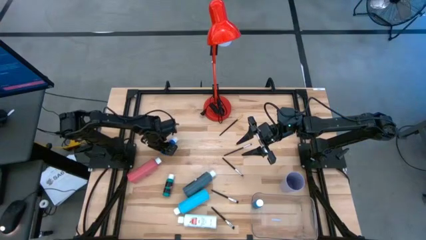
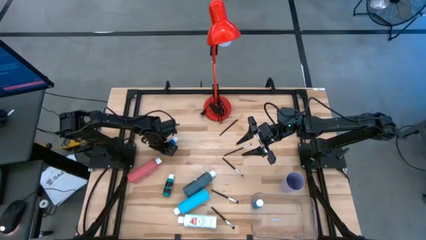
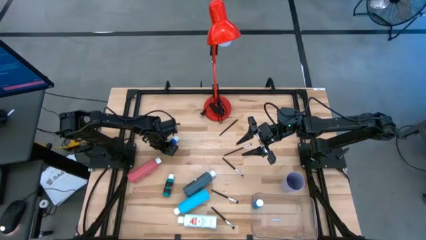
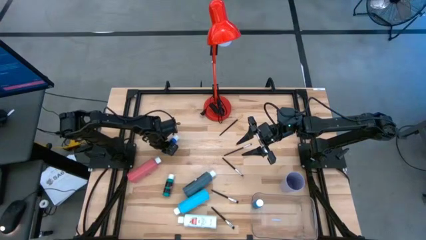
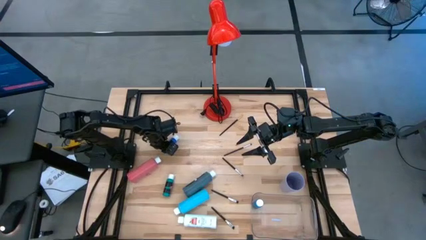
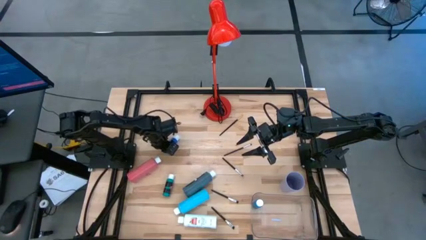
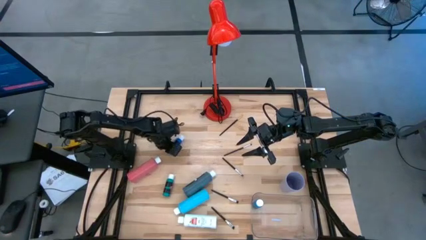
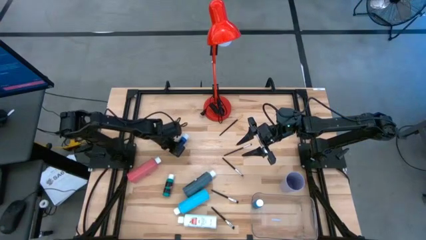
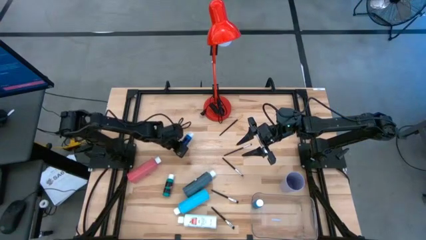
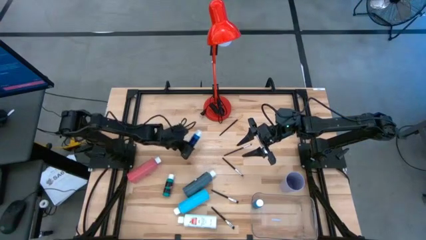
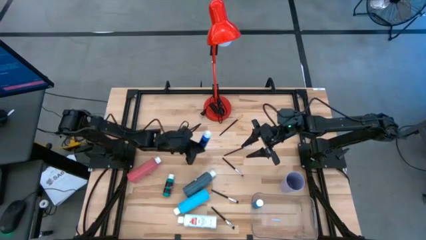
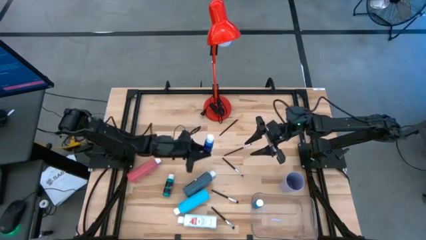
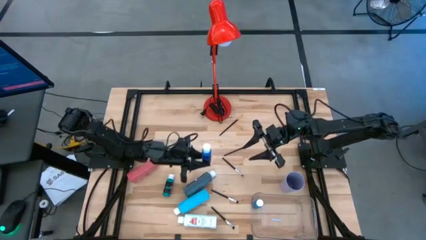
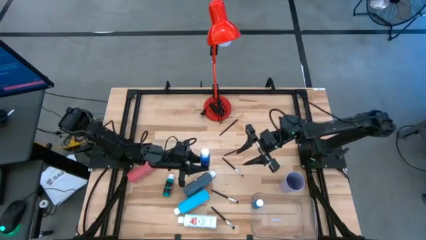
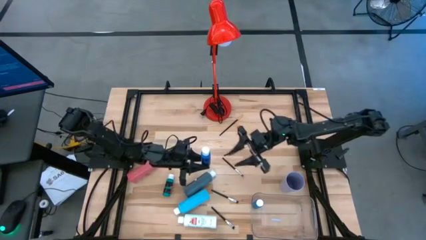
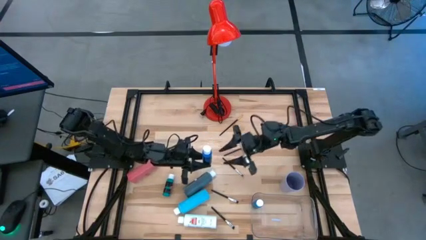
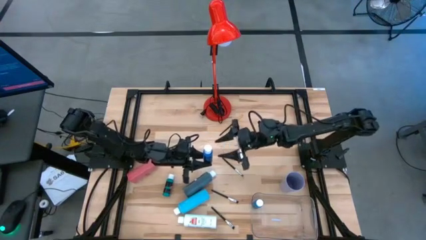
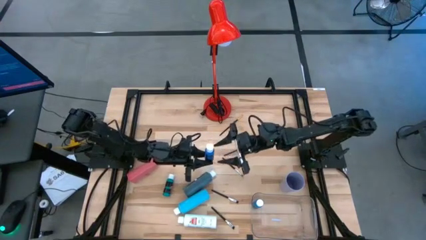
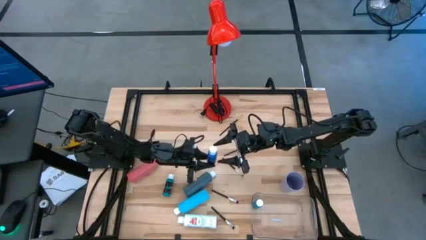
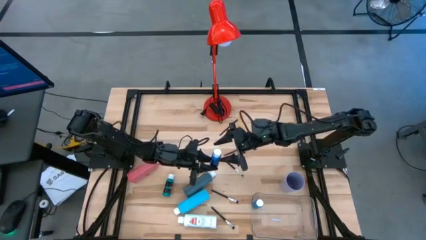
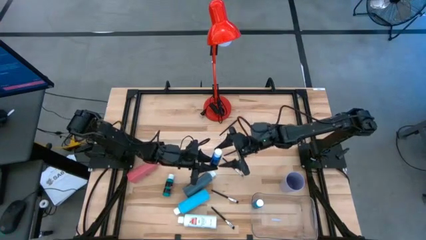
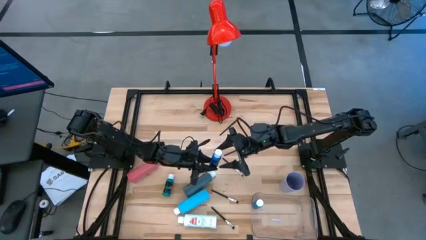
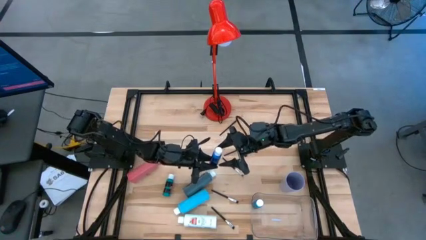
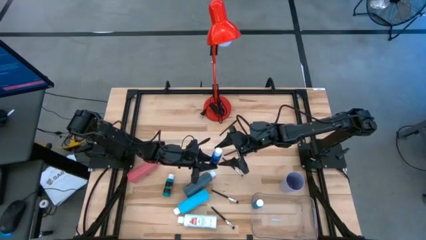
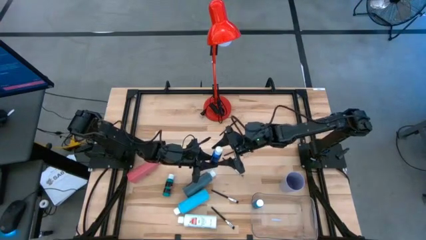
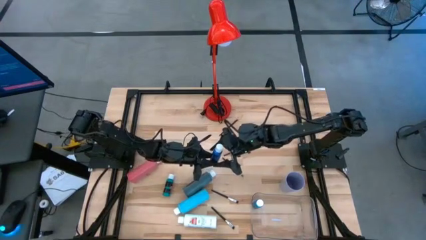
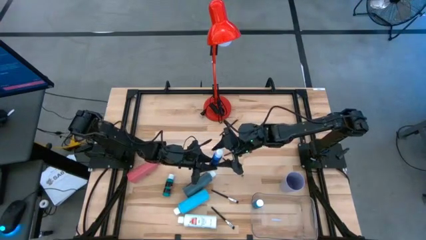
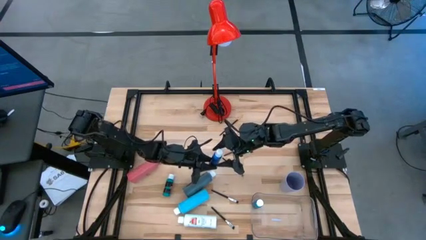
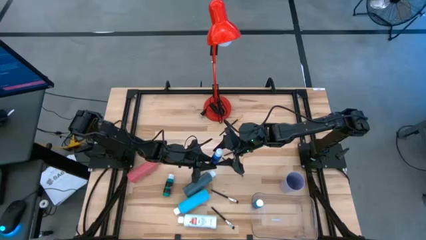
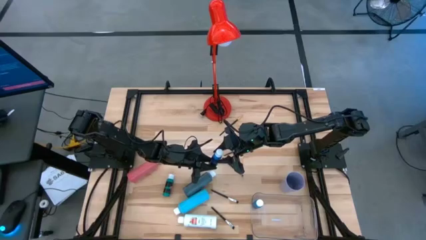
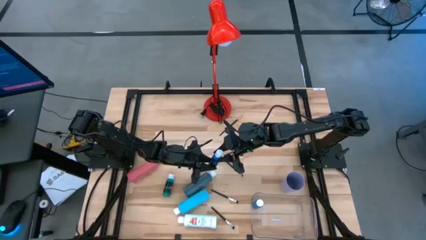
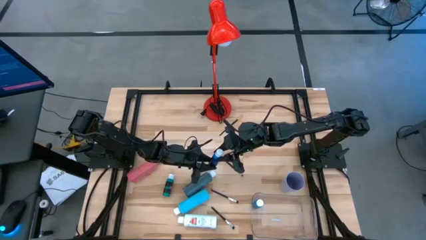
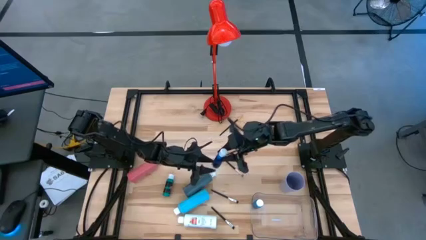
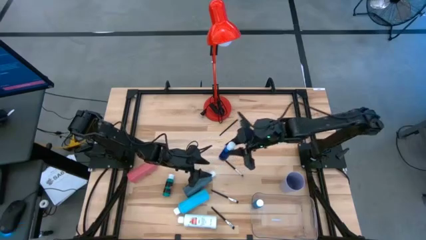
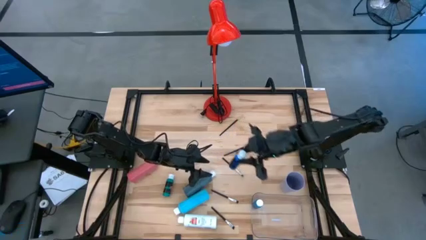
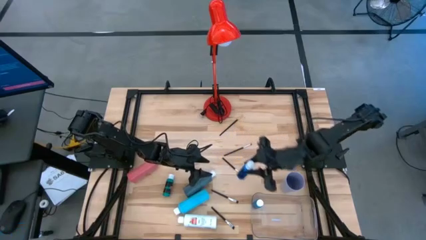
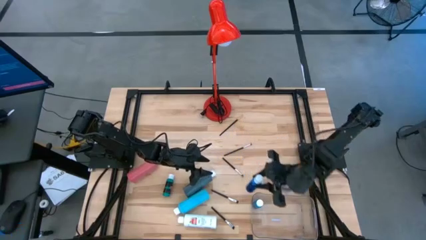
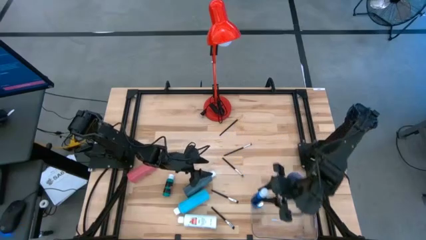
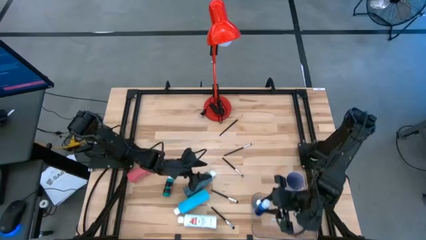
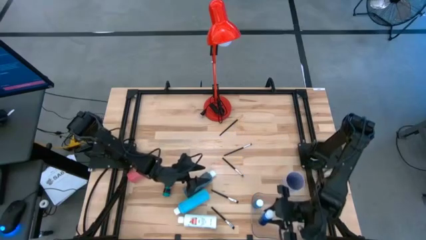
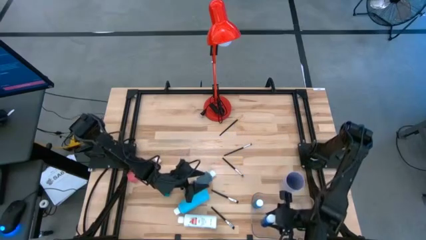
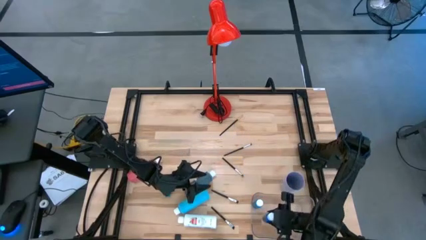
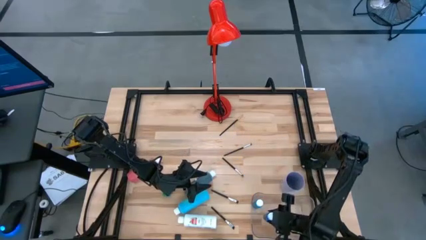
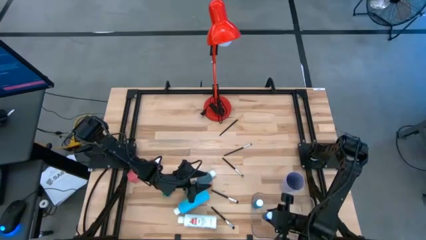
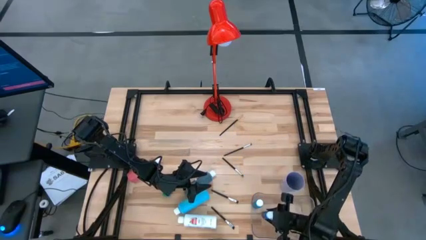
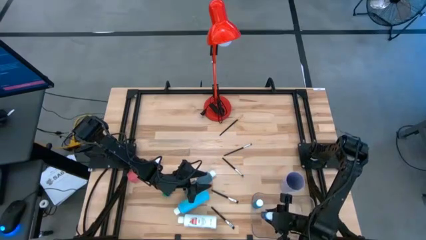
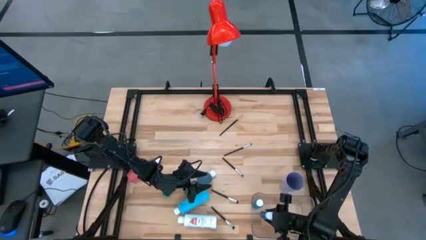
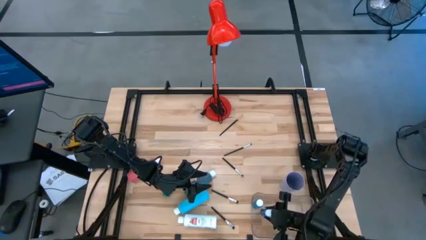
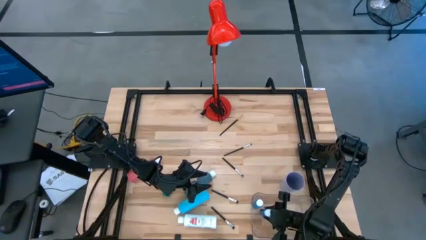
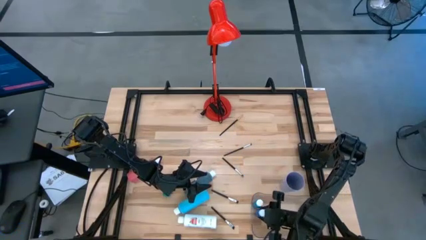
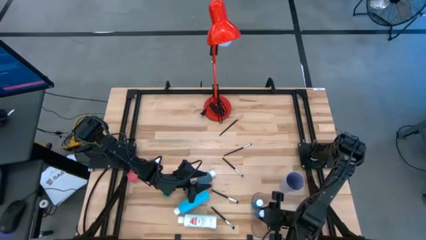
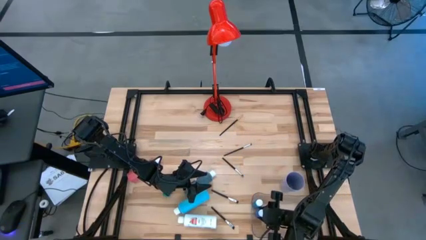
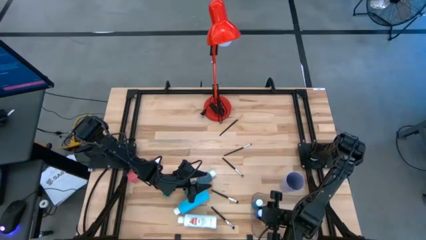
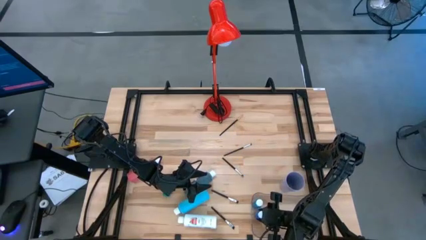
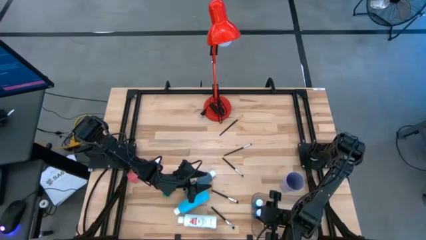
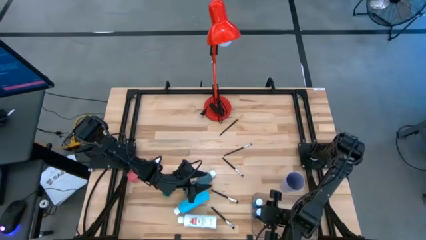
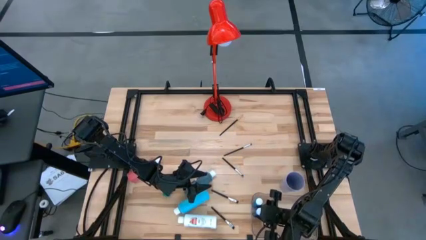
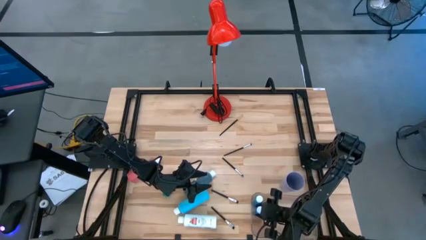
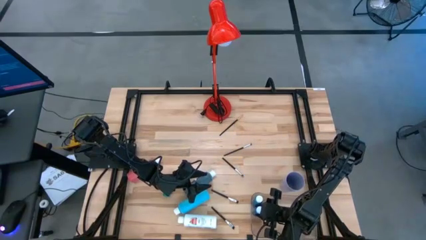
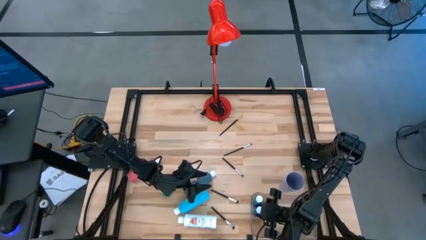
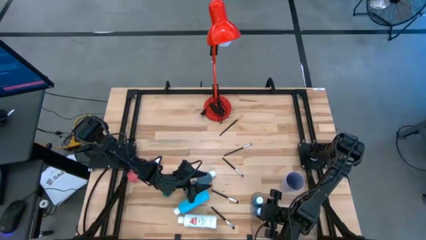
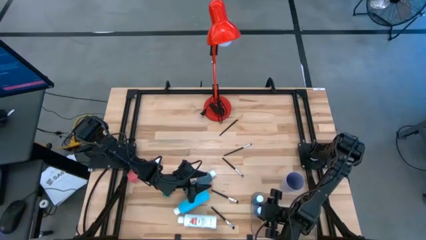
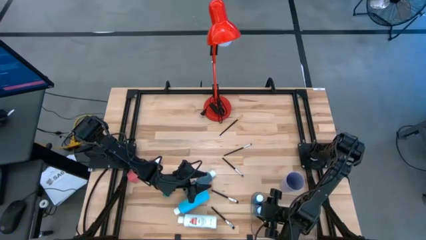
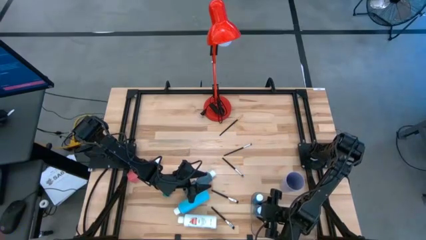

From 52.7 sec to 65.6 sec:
Task: Pick & Place Paint Supplies
Put the dark blue paint bottle into the transparent bin
